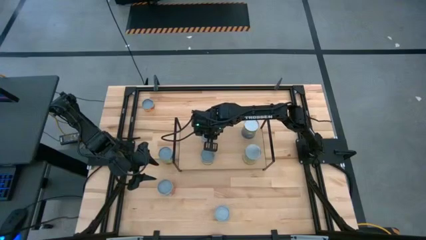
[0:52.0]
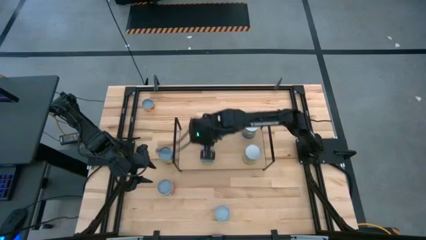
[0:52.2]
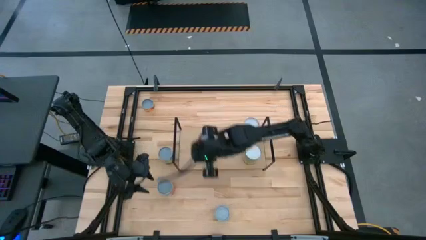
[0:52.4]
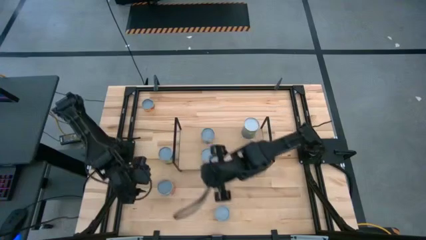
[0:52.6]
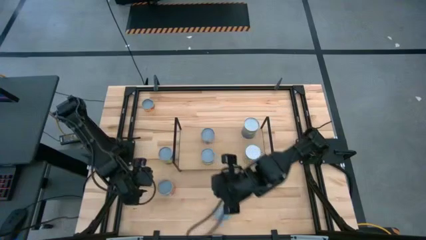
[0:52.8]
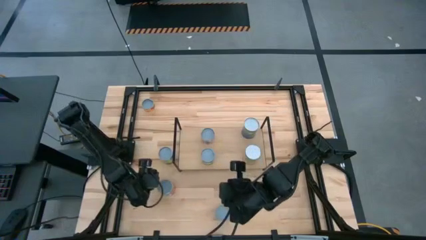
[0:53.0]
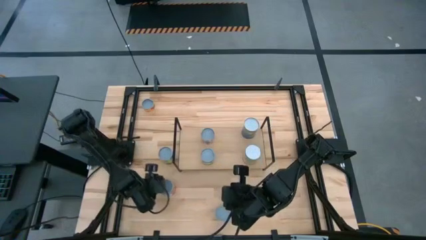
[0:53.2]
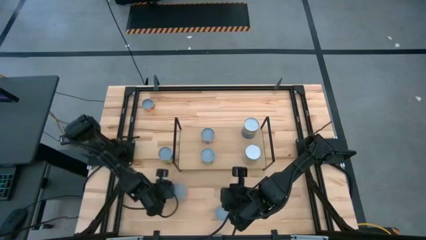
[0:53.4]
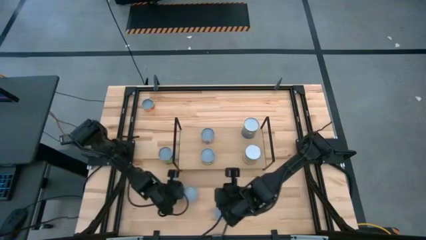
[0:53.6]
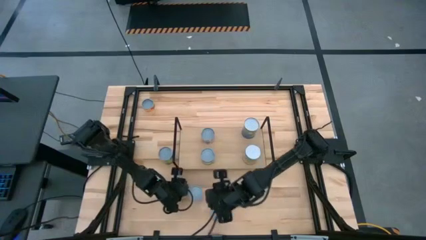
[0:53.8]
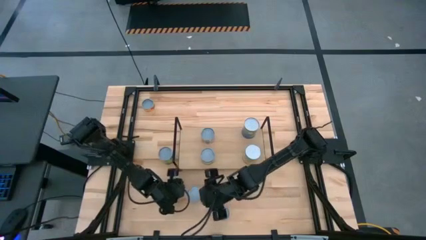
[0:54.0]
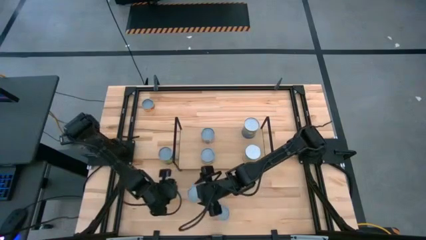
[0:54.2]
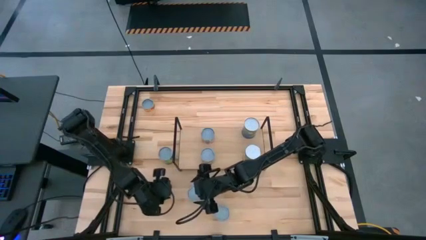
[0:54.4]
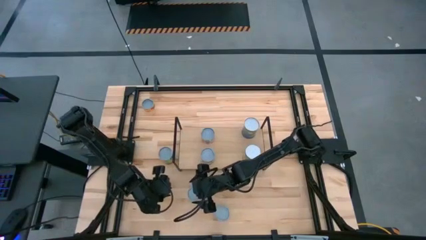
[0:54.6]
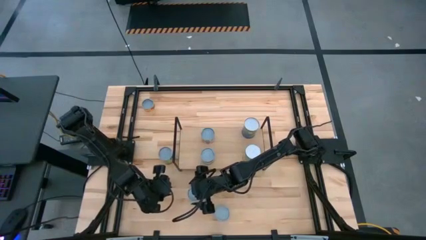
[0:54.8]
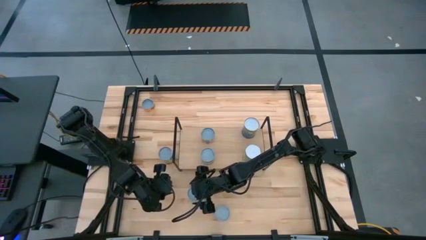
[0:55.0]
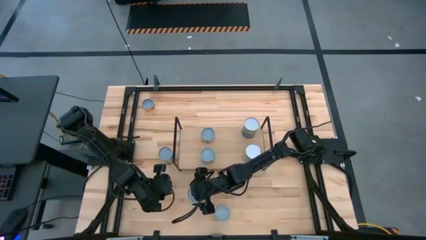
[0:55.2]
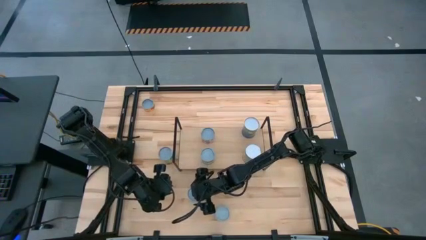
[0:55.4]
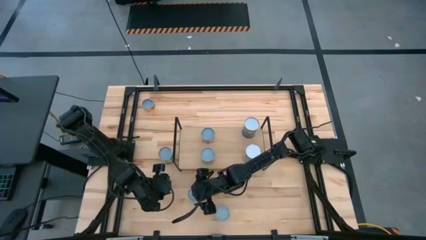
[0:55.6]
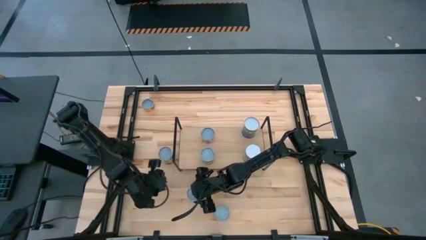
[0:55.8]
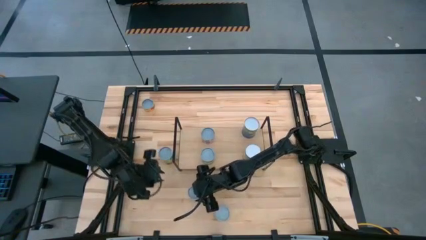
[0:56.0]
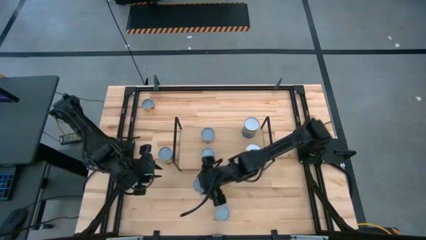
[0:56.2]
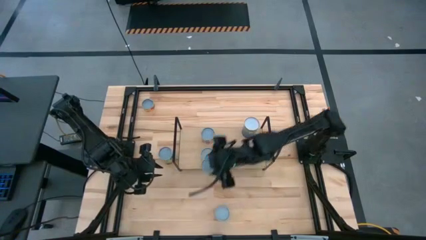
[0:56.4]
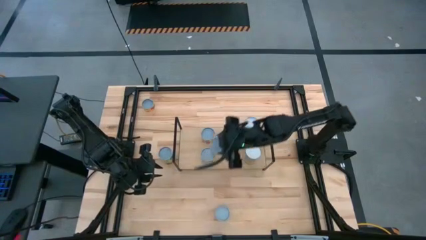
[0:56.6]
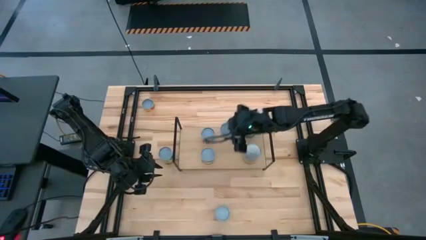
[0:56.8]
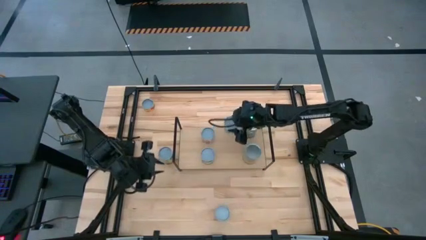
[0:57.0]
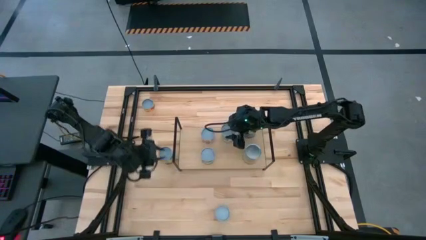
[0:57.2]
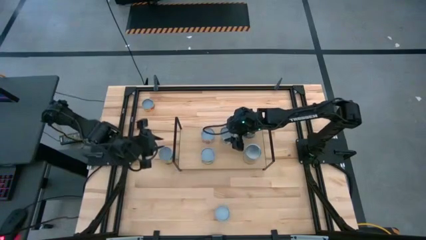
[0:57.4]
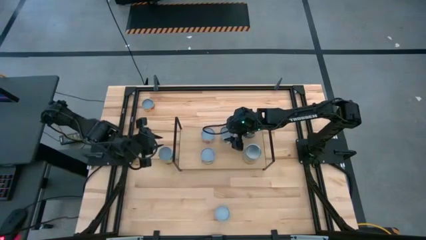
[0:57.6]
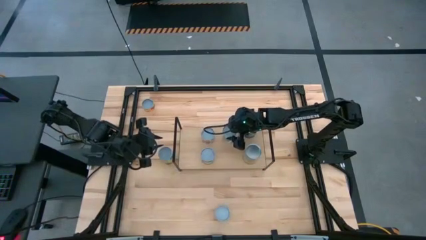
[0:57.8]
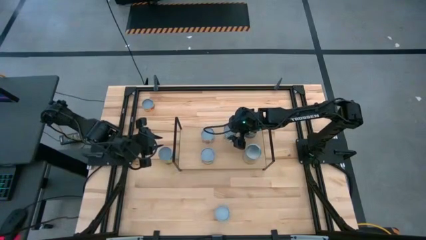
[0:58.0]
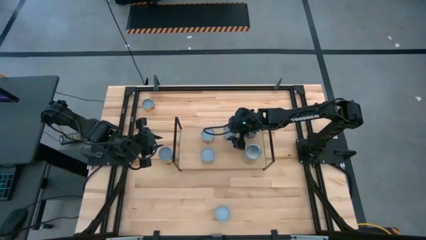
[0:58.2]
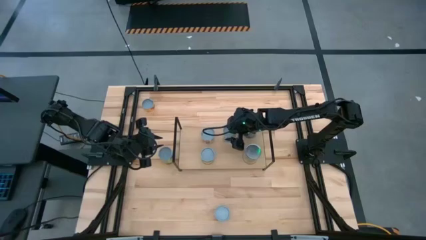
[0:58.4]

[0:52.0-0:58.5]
Task: Pick and place cans onto a shelf
Put the canned mixed fruits on the shelf

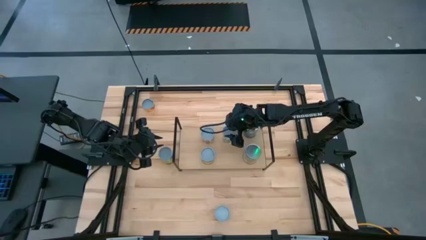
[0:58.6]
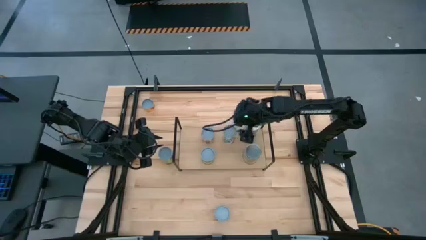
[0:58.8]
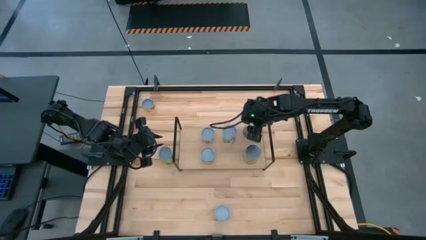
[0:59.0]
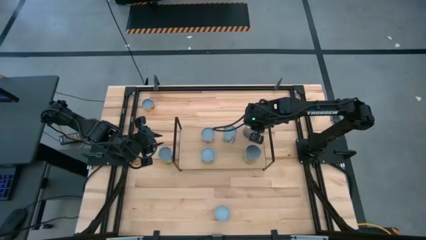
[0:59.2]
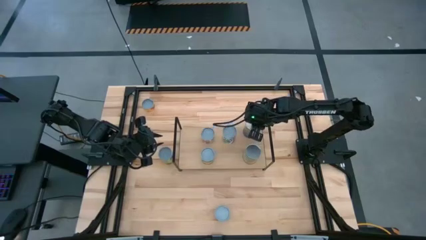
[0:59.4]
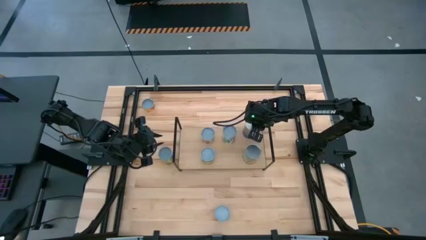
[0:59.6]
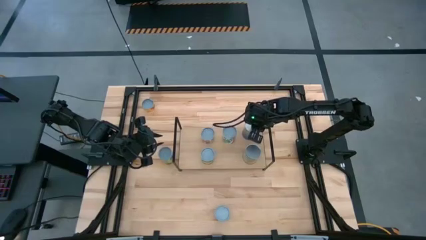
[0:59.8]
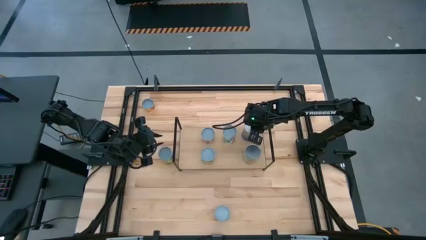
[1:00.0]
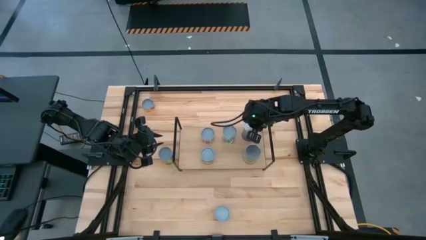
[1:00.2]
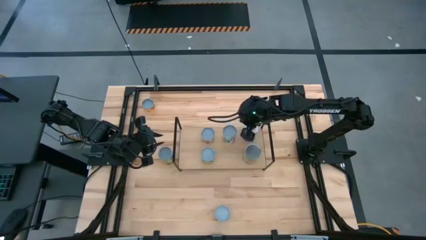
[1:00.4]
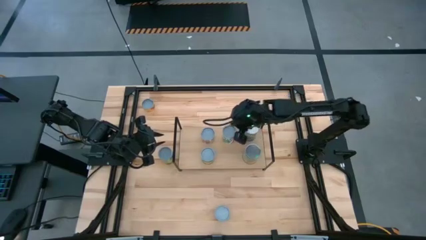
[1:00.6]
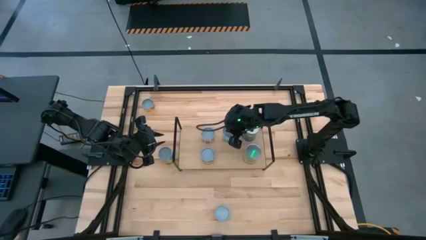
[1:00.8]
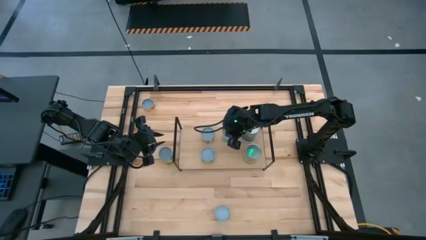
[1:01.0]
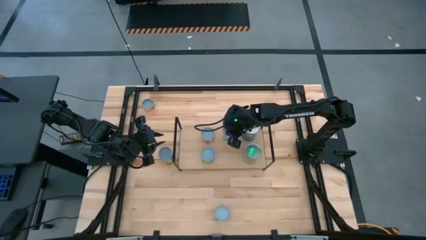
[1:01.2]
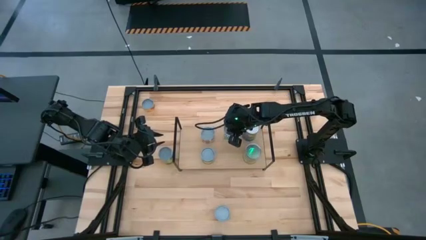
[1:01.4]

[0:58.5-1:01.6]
Adjust the cans on the shelf

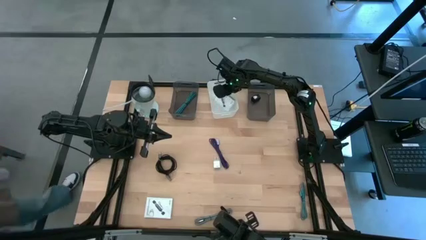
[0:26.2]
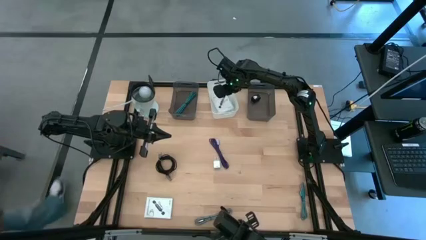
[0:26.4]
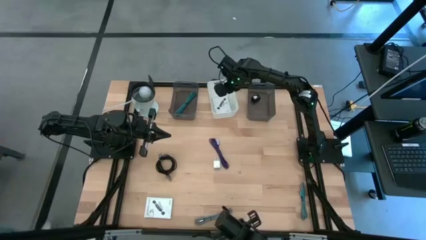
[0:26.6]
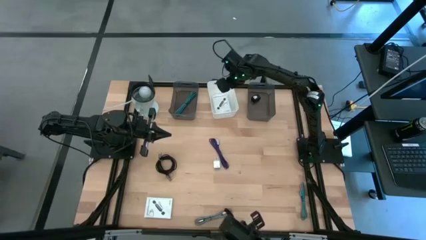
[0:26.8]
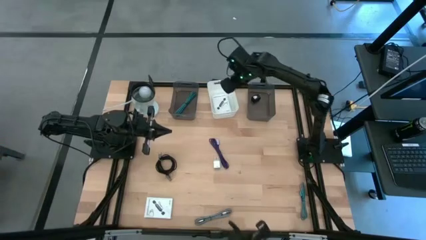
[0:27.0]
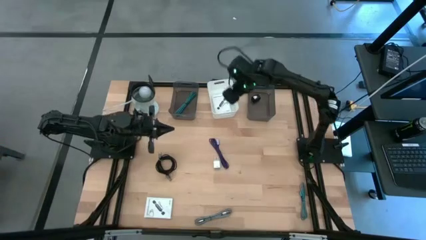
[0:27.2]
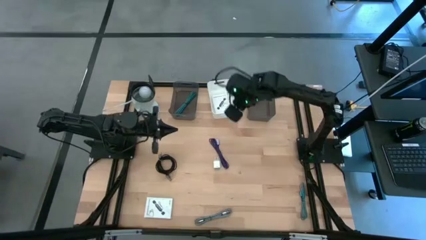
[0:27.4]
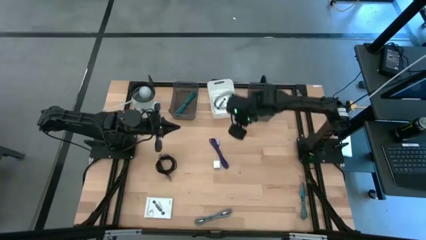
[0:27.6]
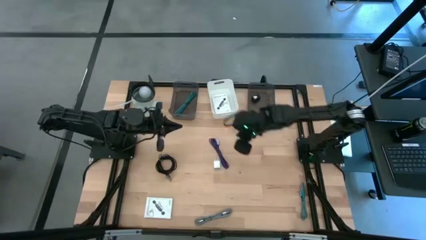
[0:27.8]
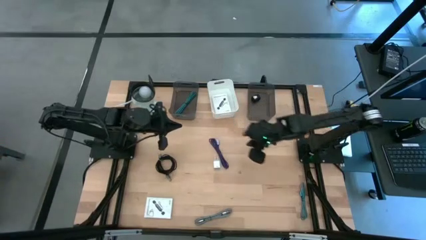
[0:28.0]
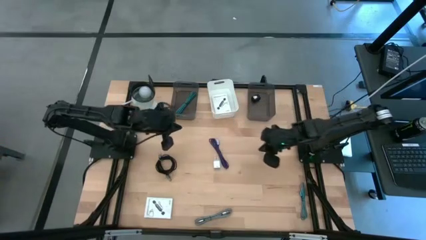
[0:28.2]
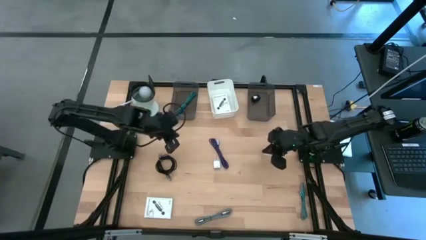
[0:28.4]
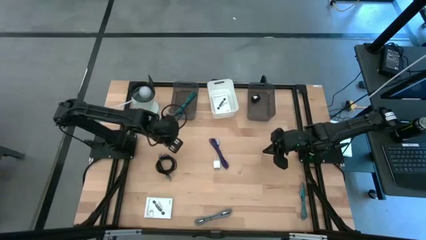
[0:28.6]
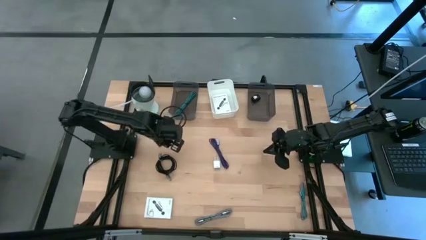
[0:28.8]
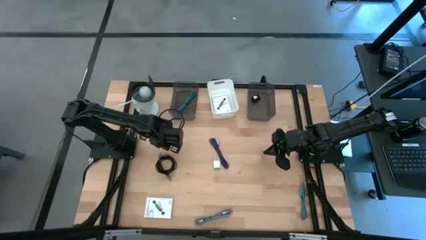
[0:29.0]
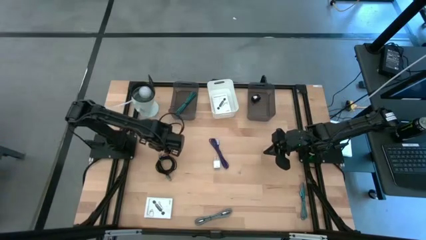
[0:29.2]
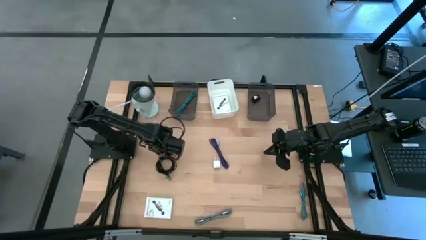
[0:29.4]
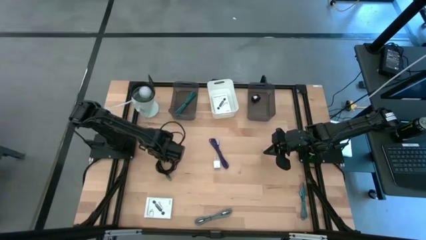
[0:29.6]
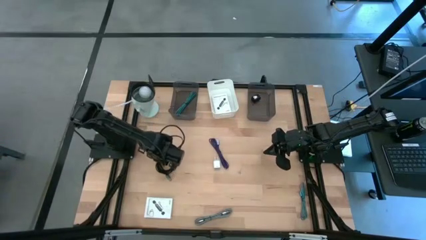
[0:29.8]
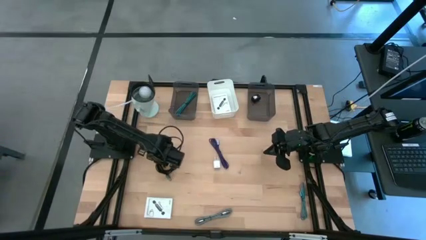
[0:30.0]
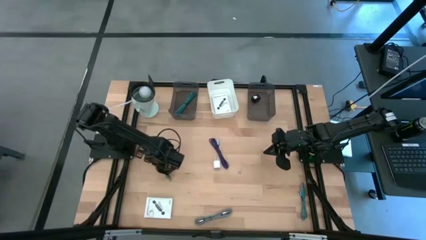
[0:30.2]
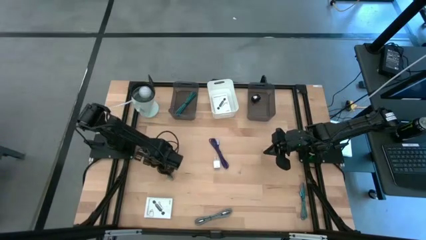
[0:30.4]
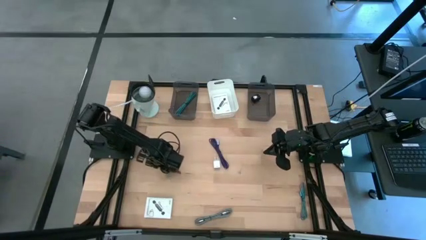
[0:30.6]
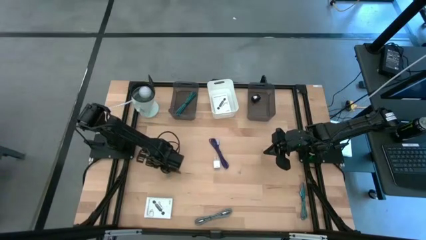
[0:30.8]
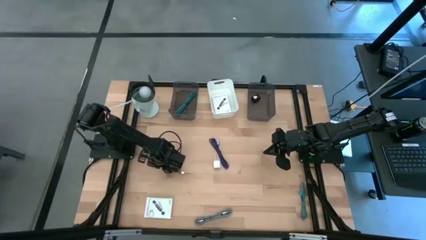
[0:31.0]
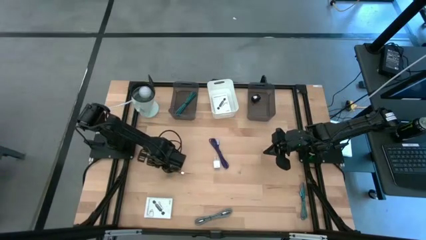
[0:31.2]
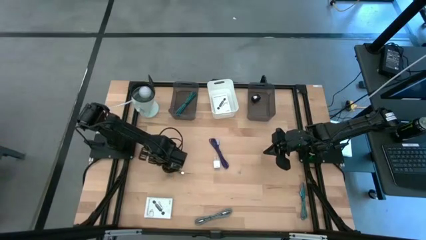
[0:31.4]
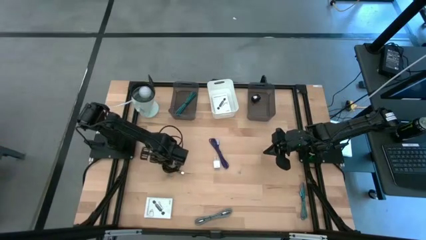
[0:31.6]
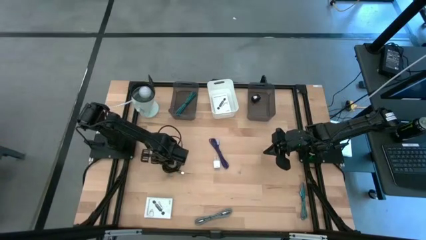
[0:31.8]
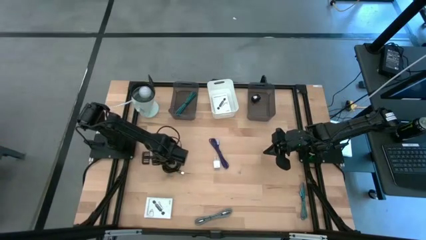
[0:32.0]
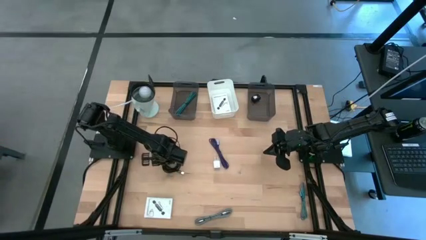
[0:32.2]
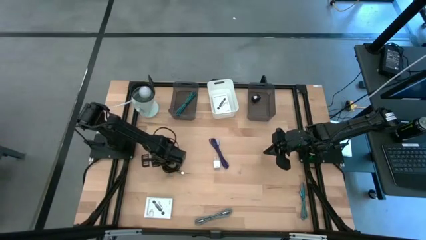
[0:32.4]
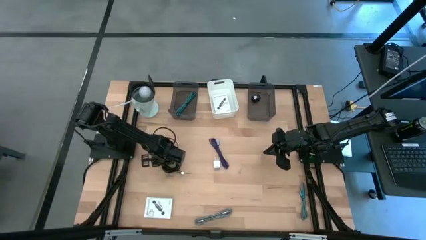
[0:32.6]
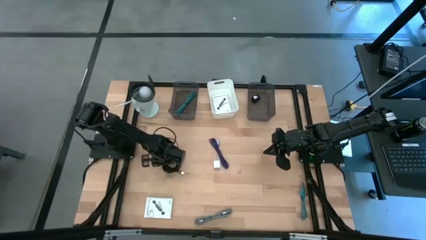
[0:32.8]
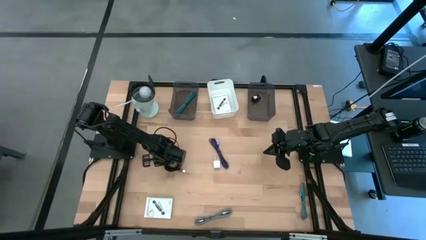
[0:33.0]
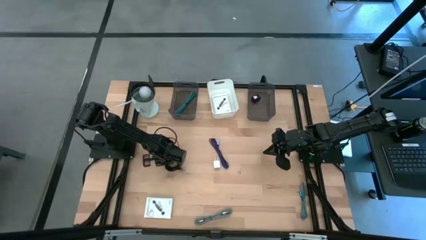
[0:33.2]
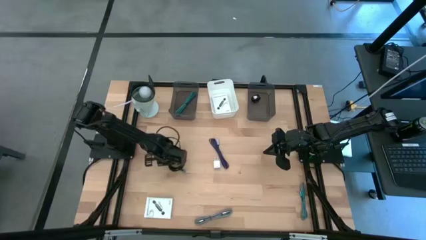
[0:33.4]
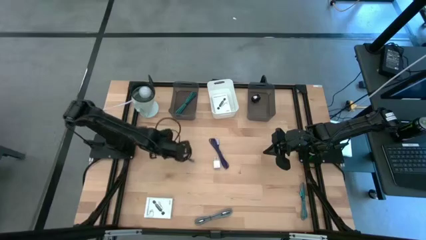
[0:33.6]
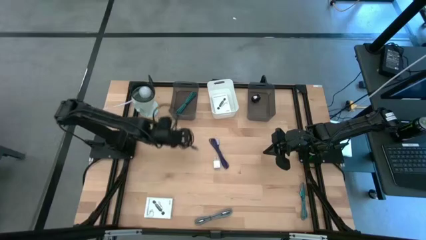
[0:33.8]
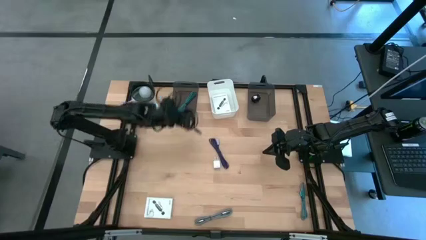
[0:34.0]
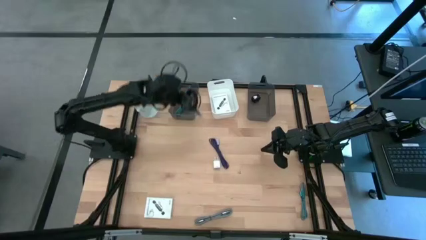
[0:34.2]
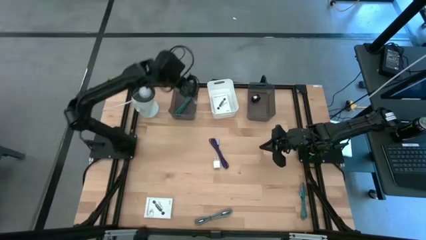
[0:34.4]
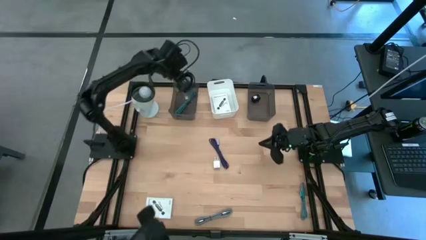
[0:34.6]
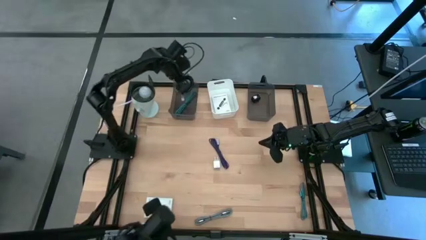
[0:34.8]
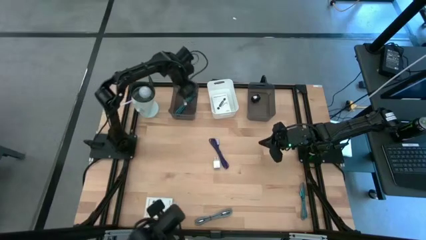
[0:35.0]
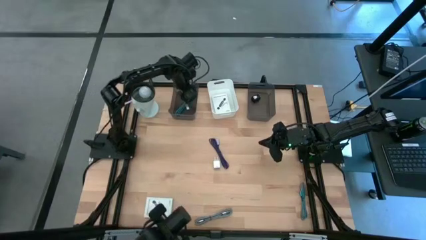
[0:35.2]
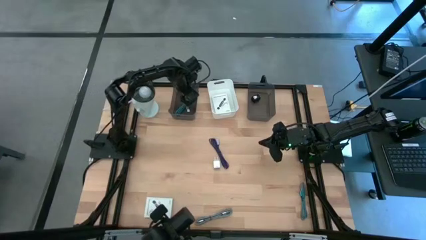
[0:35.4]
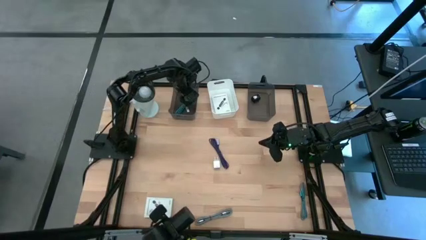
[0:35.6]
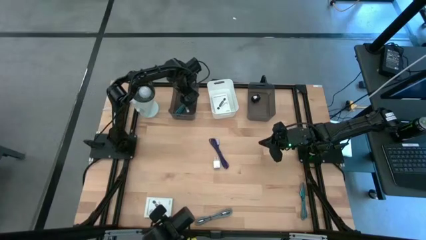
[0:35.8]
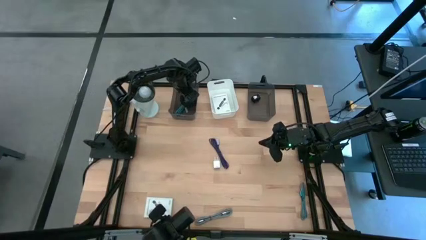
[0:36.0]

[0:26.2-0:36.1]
Task: Pick and place items into bin
Put the black charger cable into the left black bin
